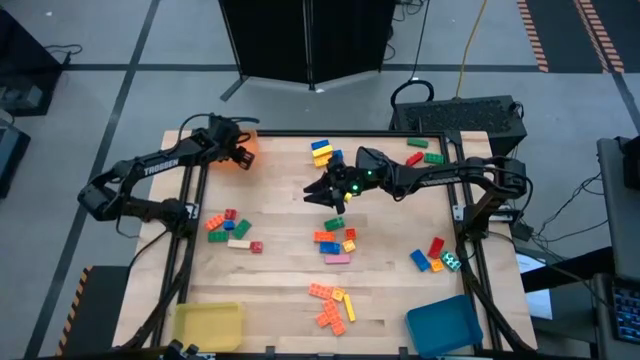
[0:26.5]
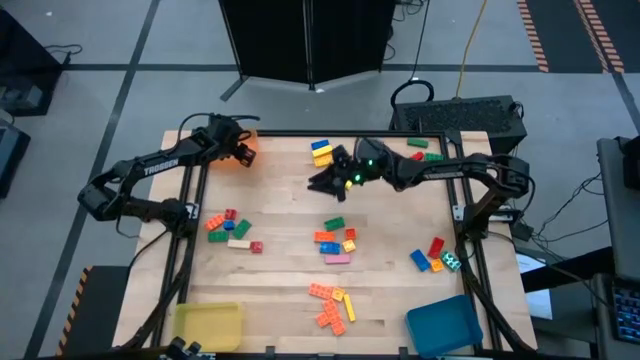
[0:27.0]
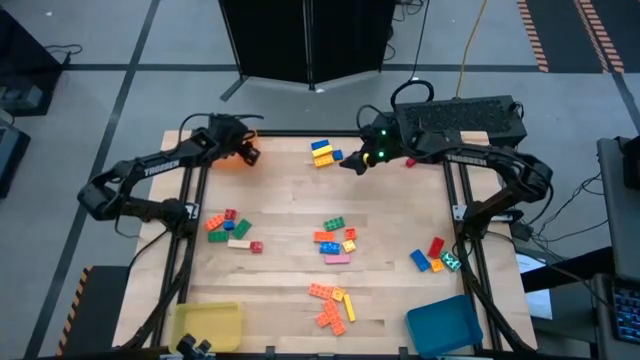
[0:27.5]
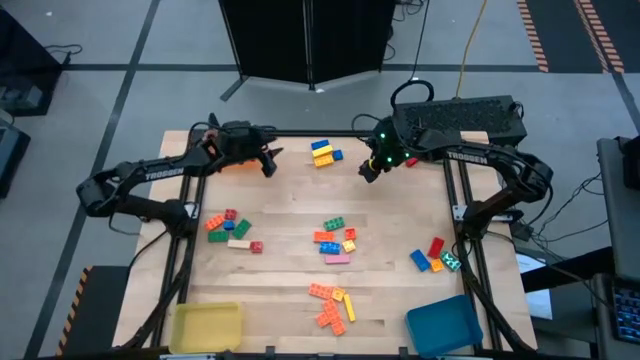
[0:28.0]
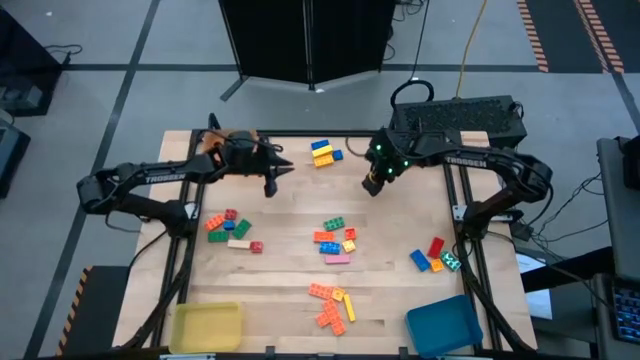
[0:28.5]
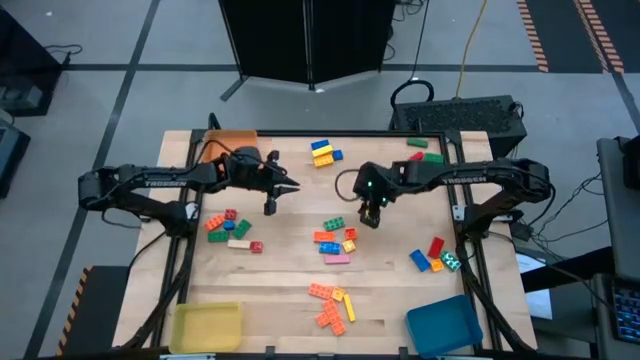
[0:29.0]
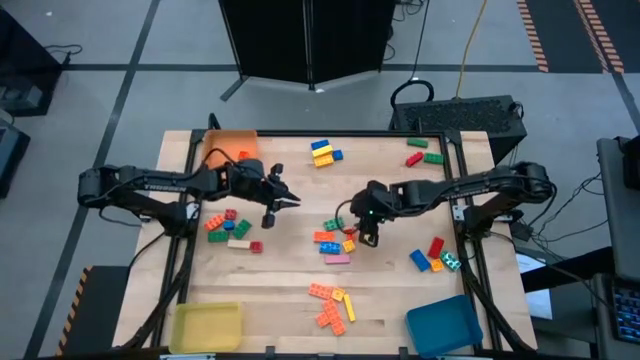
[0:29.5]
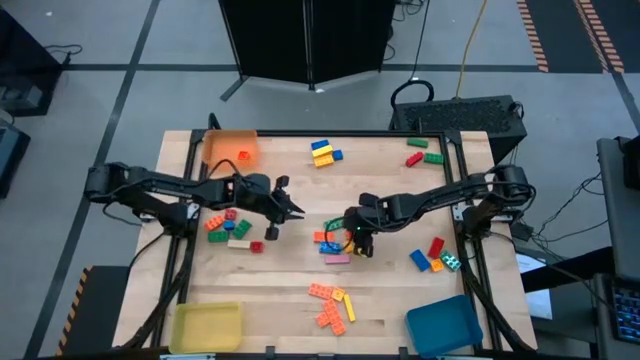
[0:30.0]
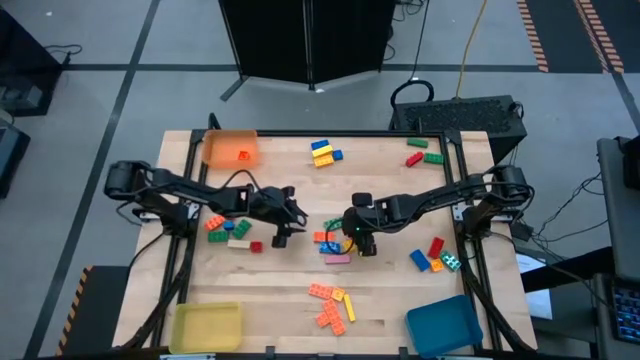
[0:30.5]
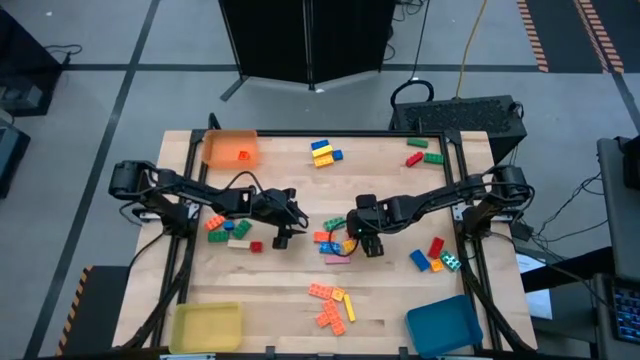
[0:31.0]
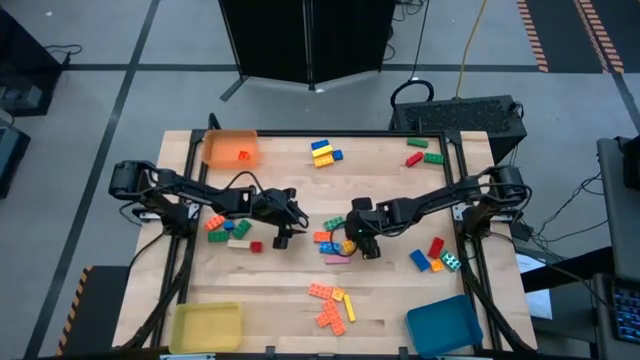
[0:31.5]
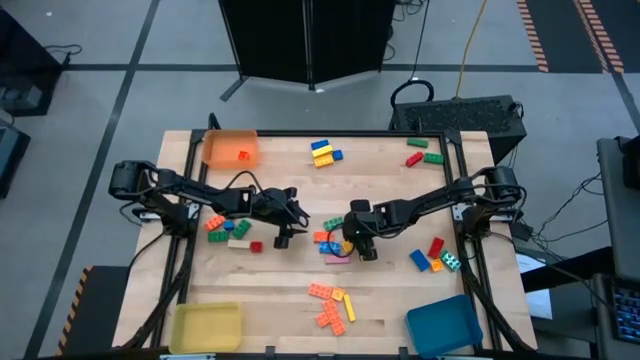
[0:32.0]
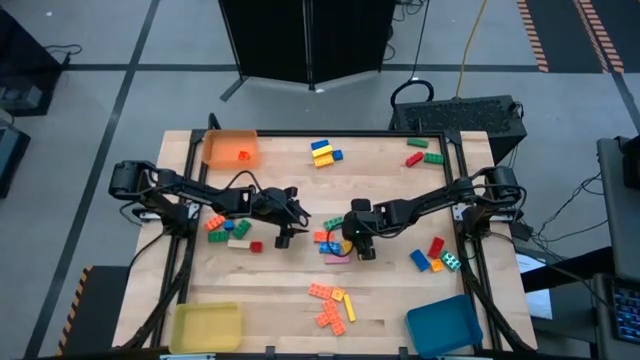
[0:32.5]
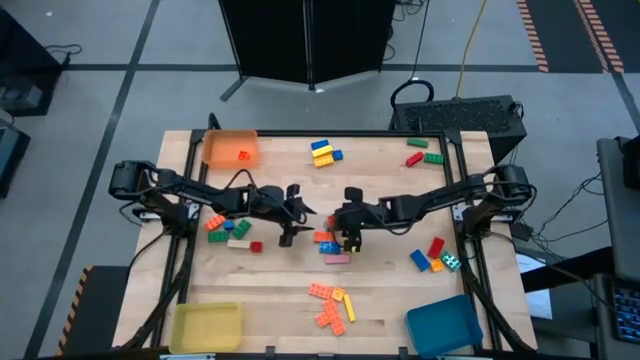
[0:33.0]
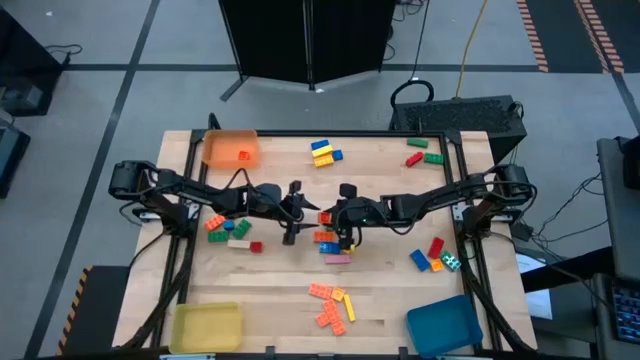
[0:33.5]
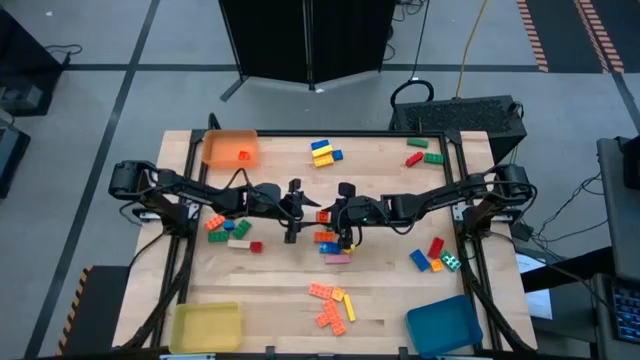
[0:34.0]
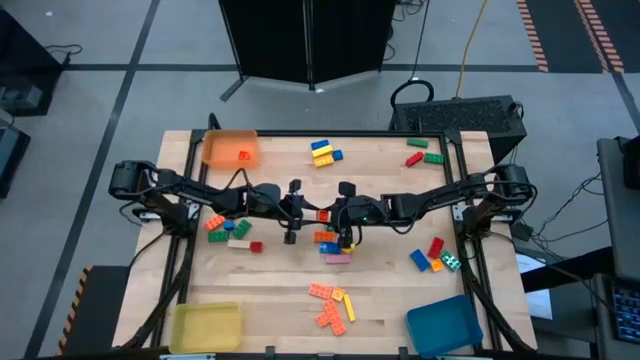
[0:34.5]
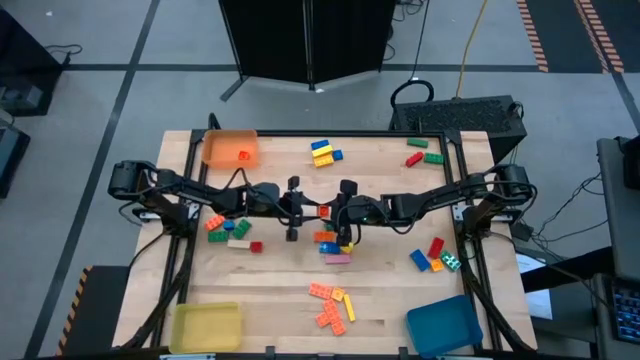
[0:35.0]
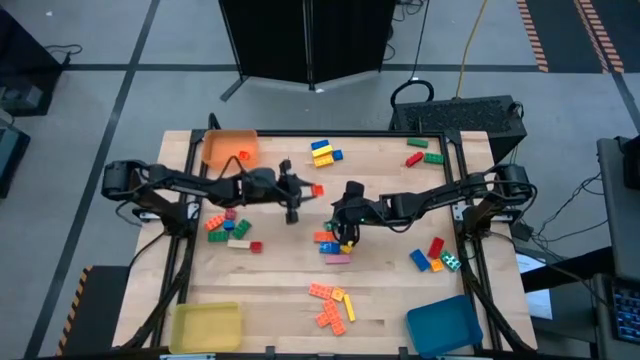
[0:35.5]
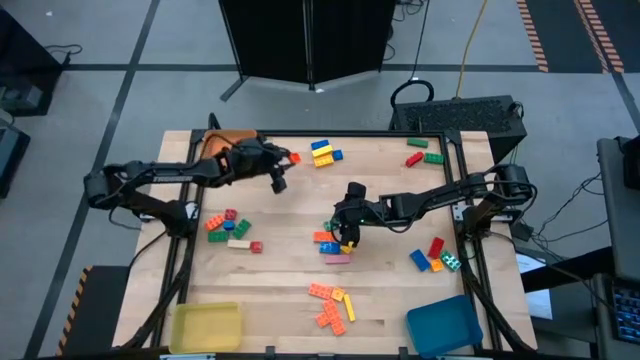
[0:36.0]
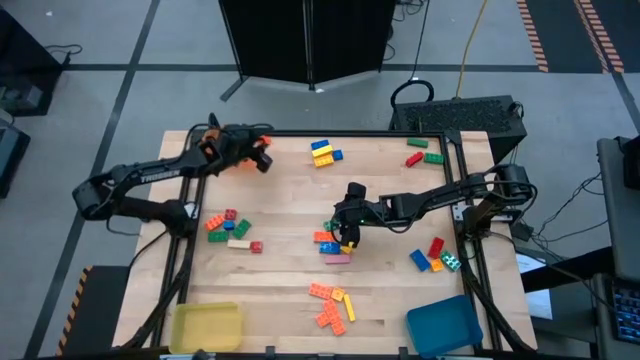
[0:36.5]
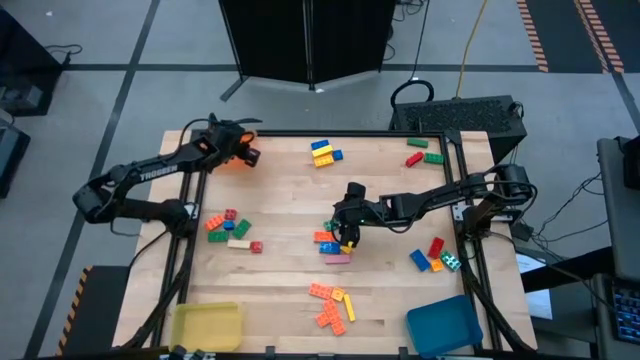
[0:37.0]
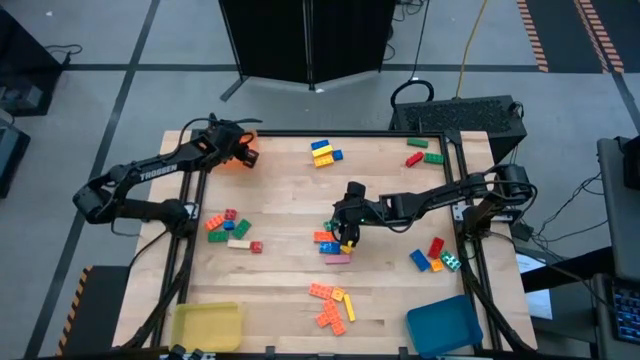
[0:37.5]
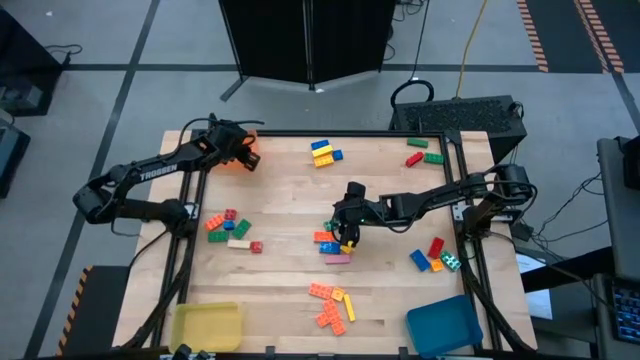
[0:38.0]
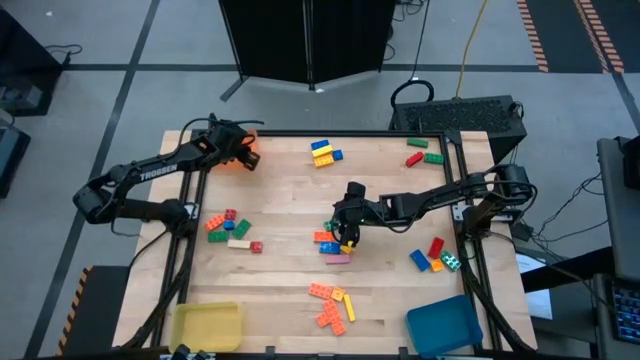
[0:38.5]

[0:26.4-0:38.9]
Task: Sort blocks by size
Put the orange 4 stud game piece into the orange bin

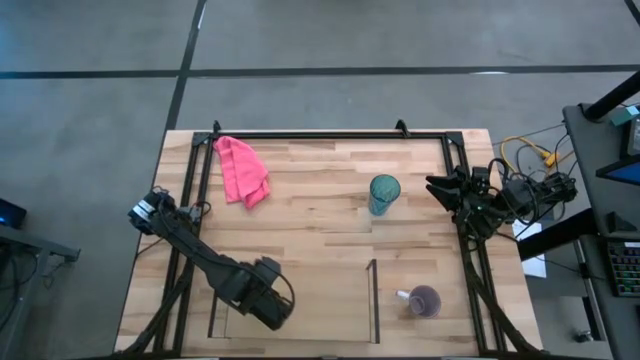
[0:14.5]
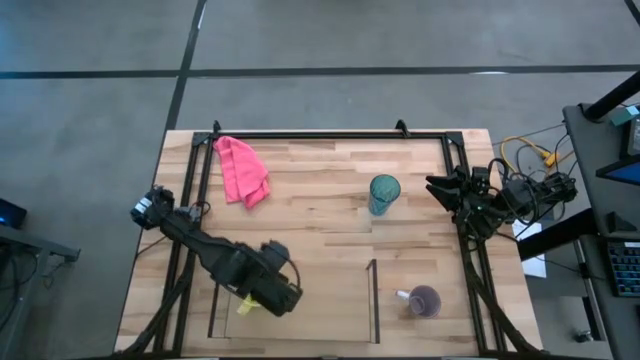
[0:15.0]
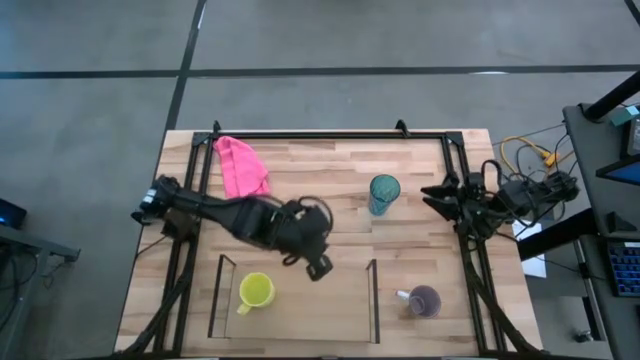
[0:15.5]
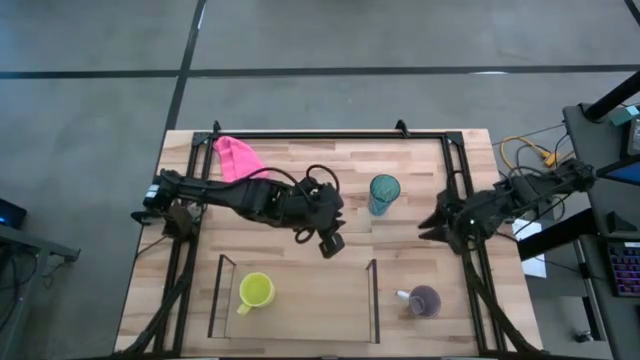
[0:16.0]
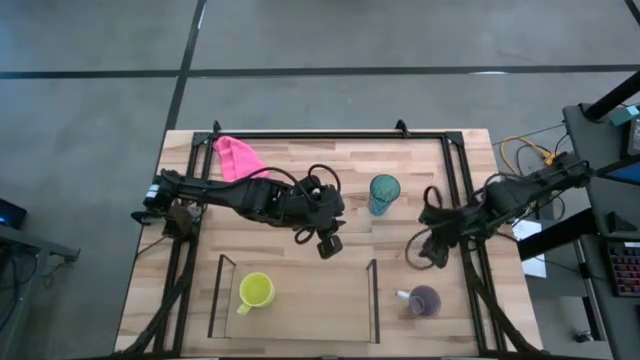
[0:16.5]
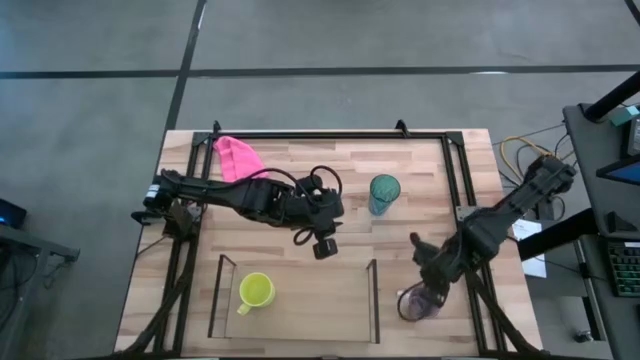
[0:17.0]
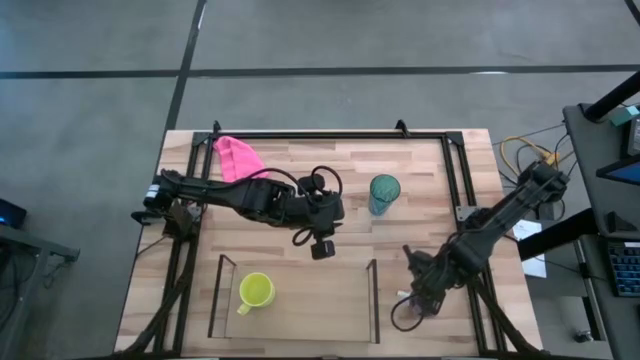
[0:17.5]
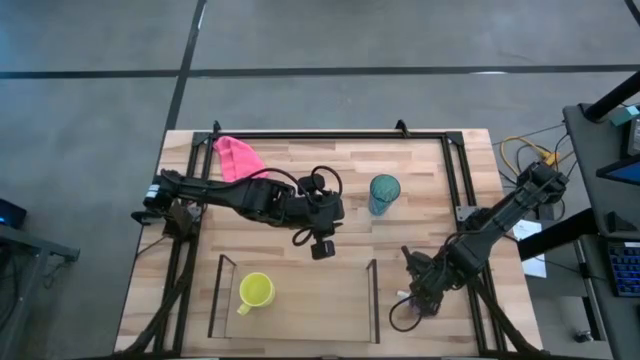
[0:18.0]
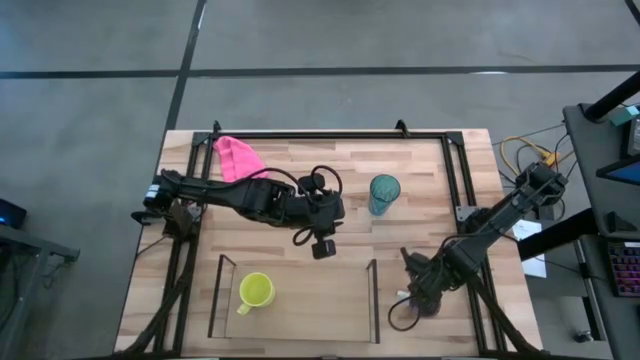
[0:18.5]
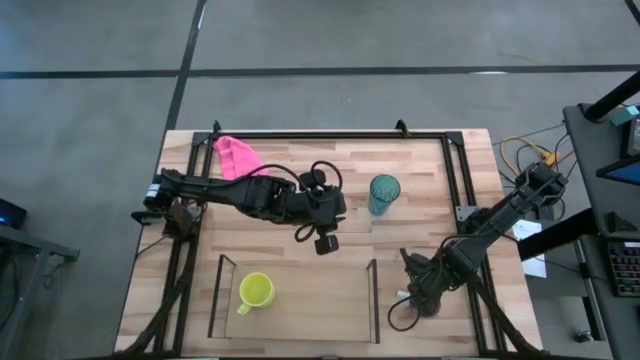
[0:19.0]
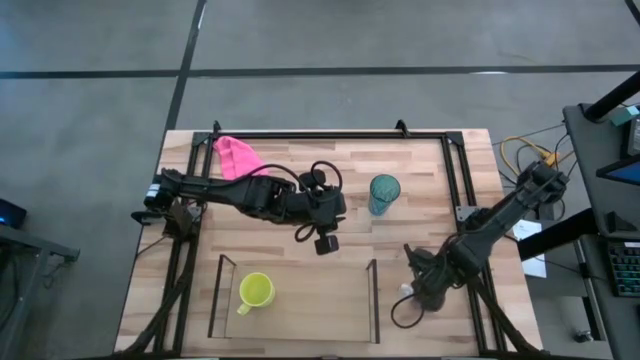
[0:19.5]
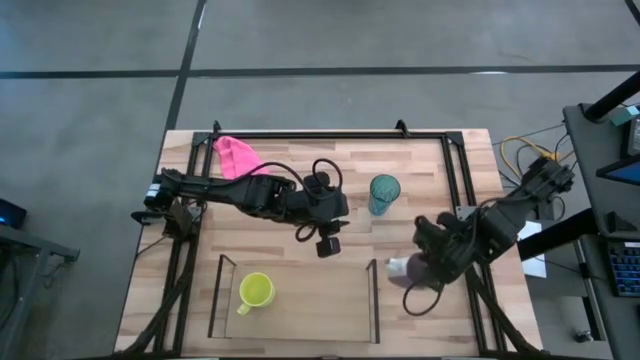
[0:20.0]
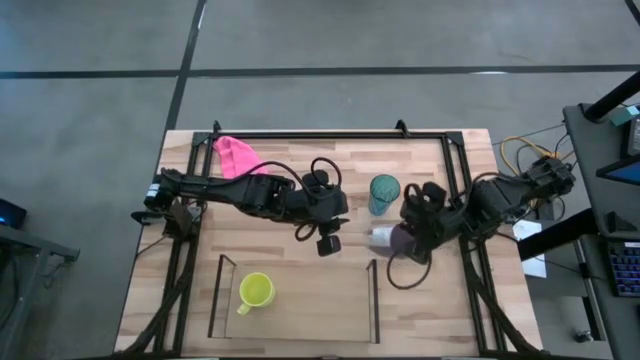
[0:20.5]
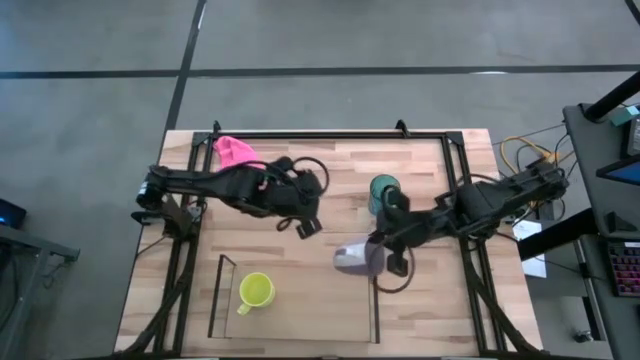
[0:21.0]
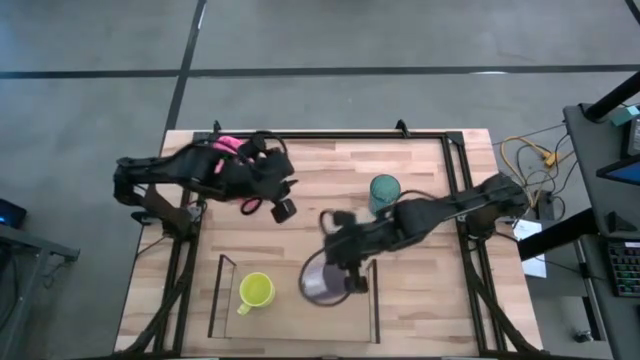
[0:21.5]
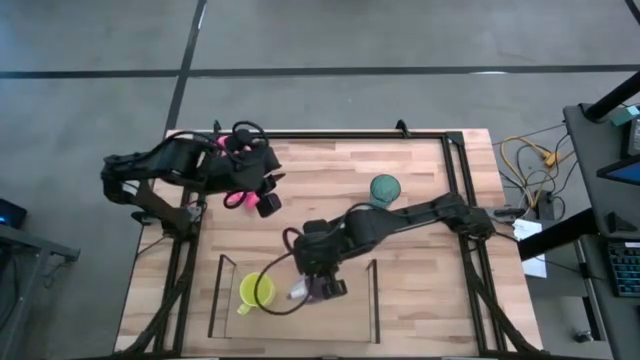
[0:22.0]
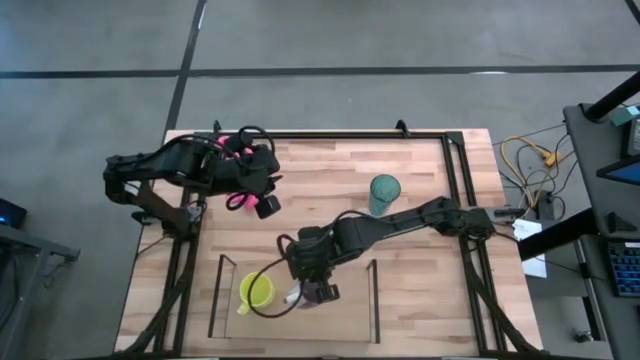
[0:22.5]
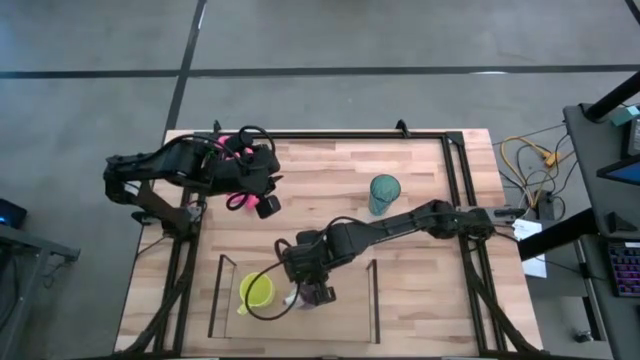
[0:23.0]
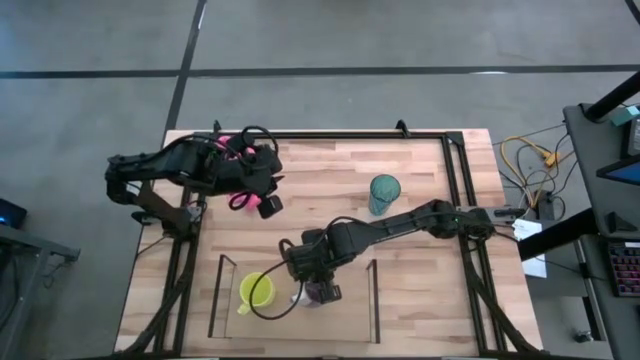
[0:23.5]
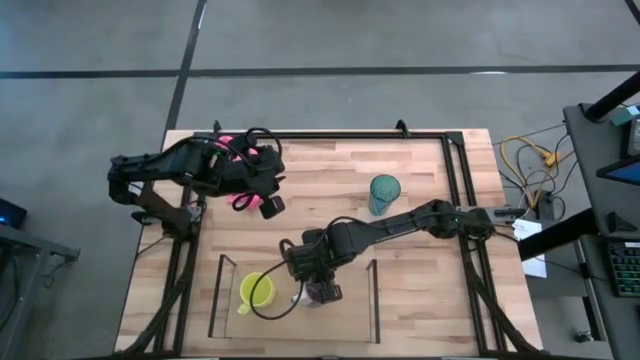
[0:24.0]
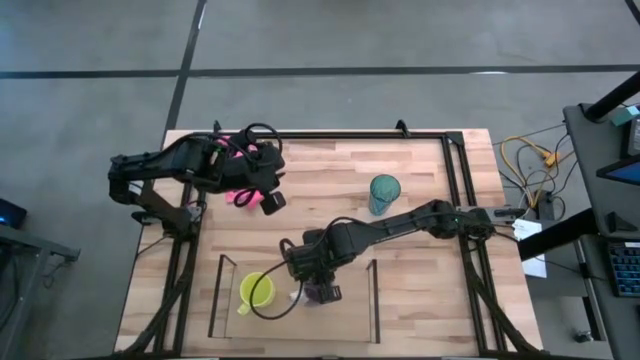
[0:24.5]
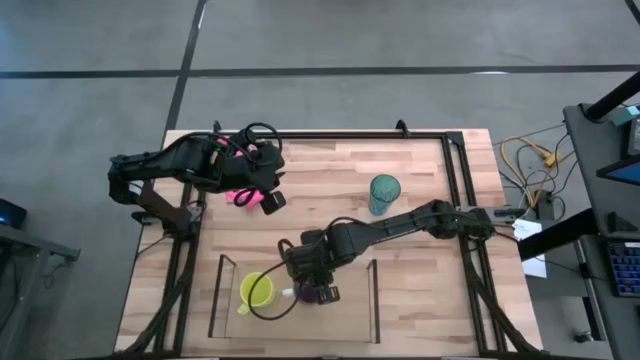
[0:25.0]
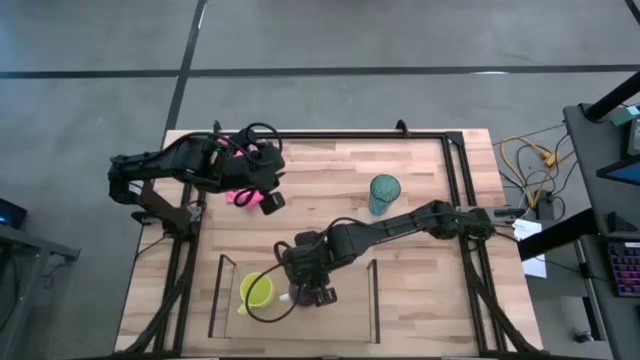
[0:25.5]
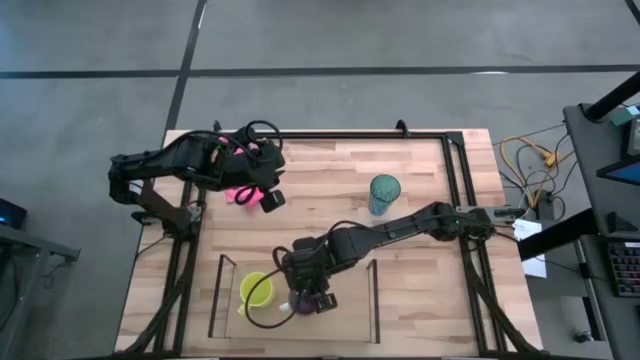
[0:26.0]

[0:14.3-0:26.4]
Task: Stack small to large cups/mugs on shelf
Put the purple patterned mug on the shelf
